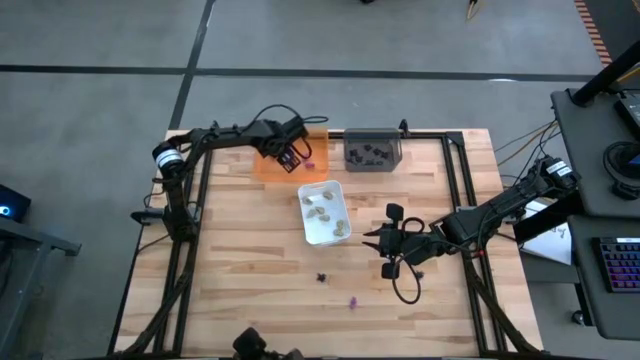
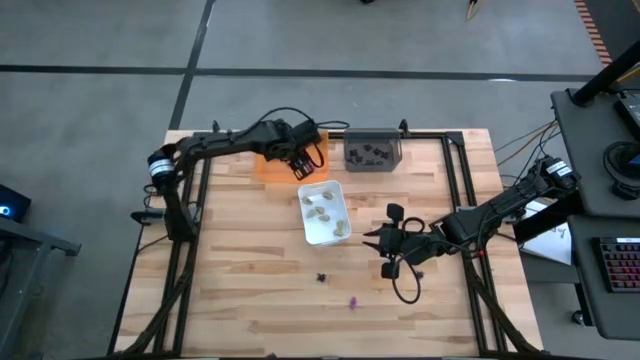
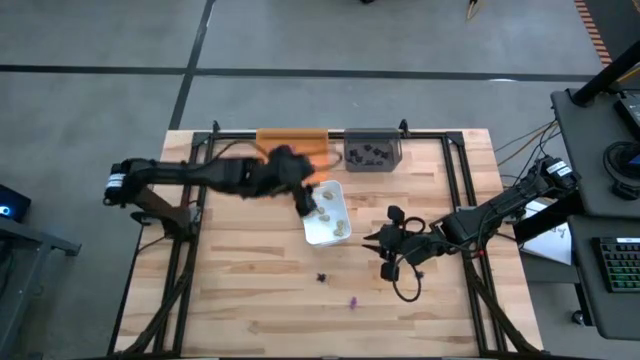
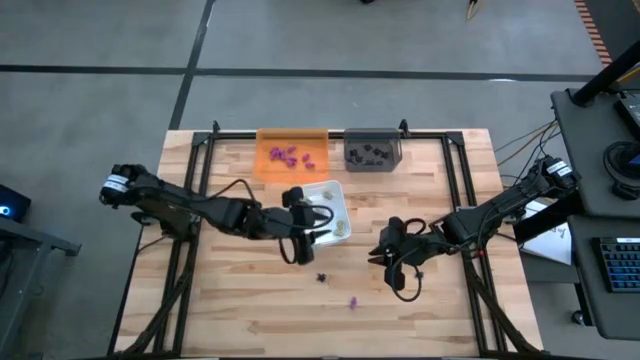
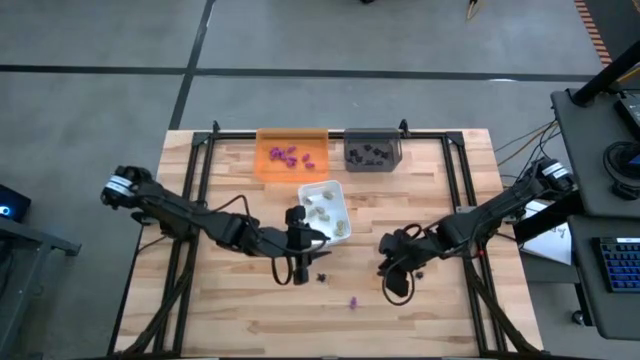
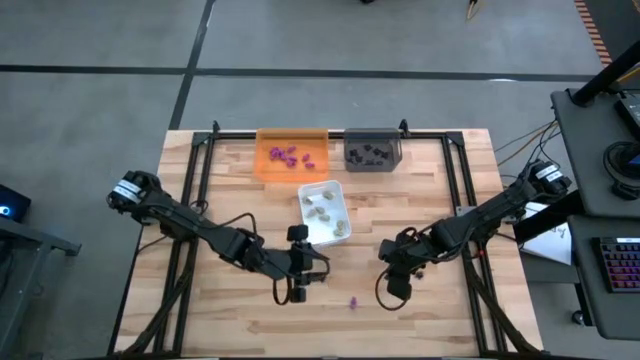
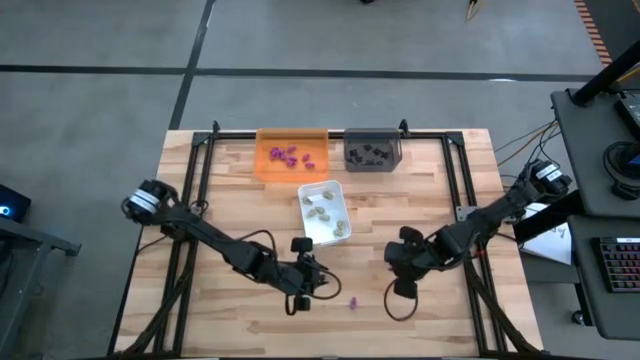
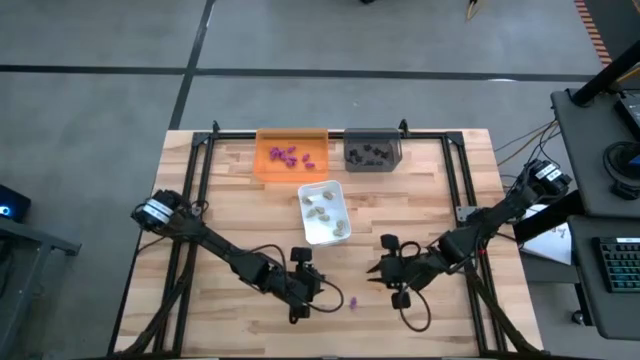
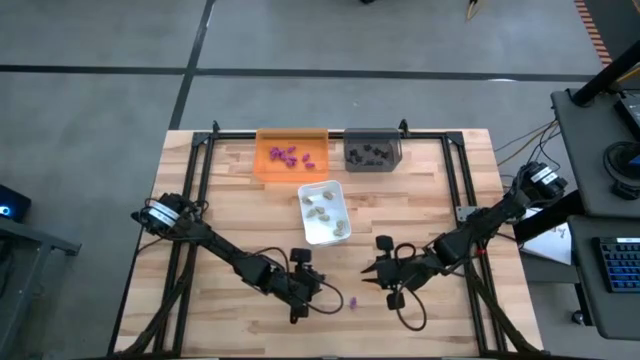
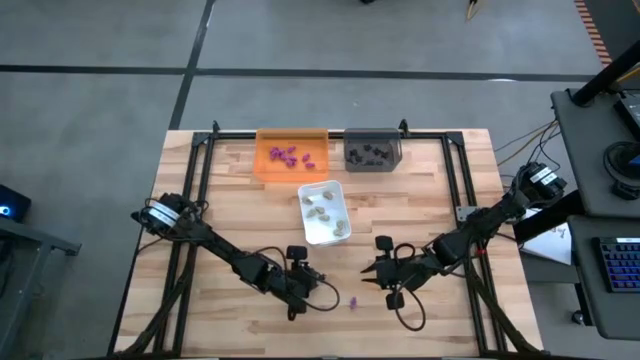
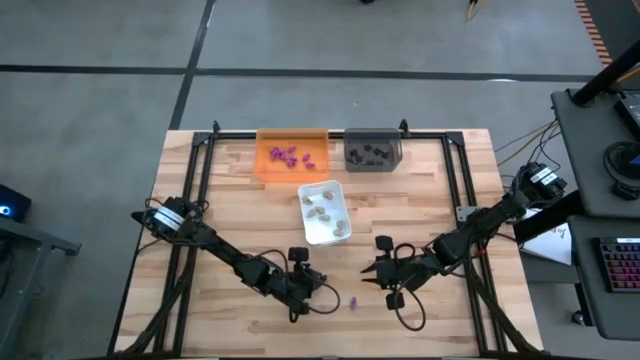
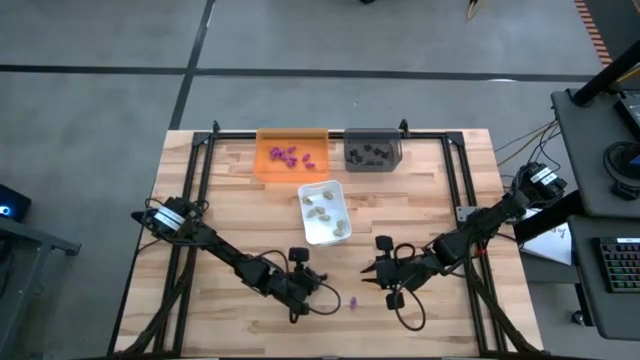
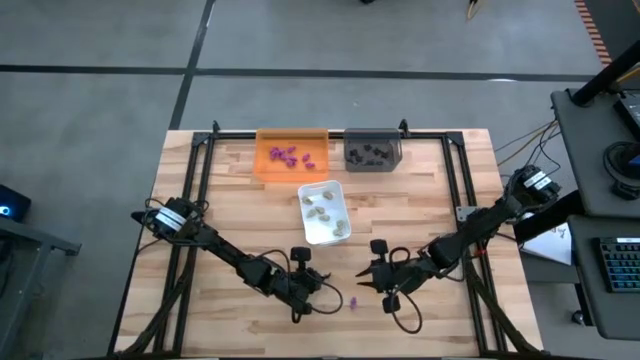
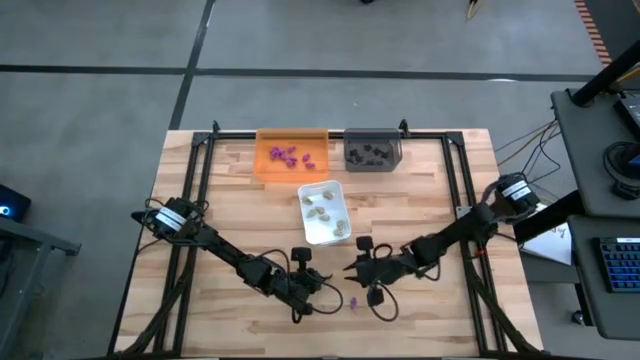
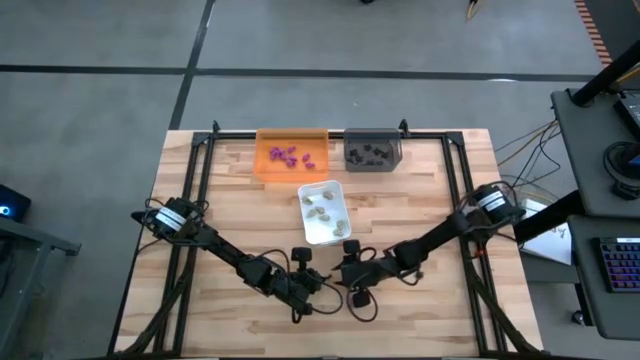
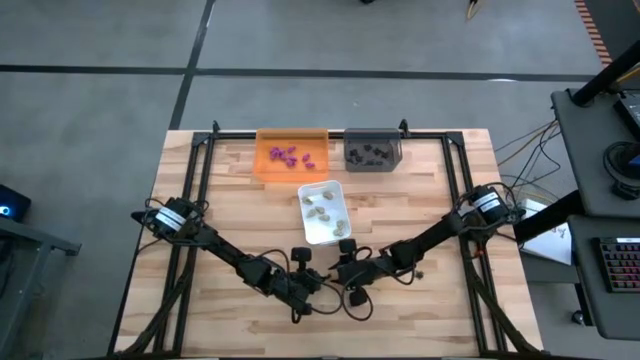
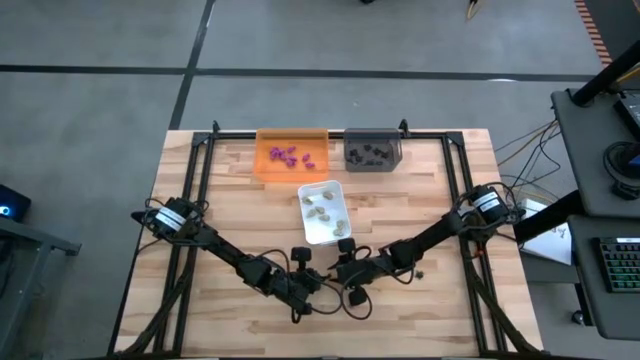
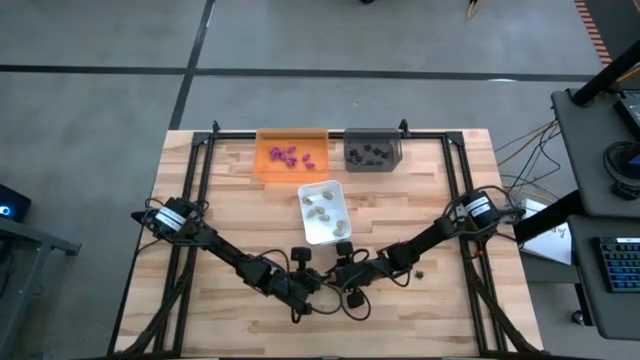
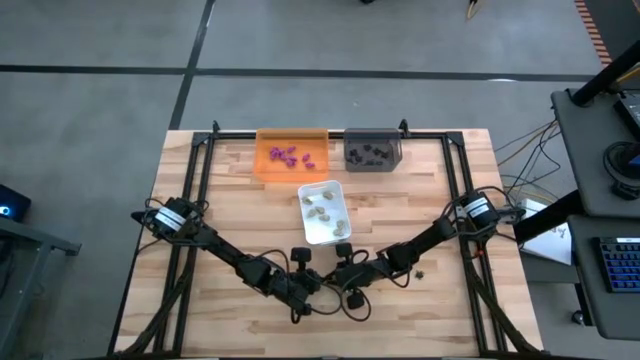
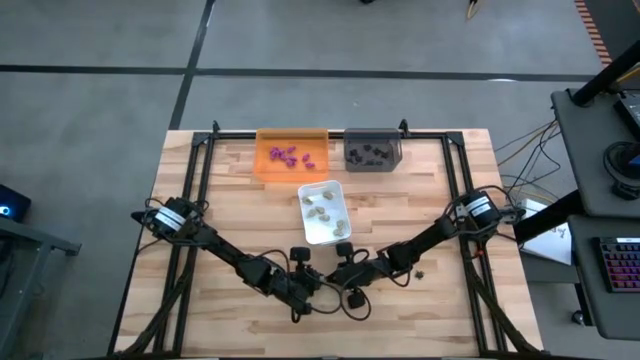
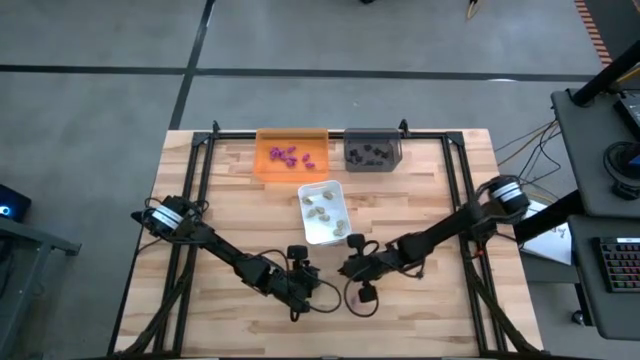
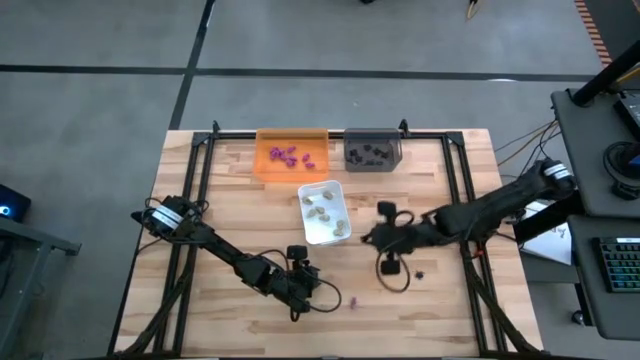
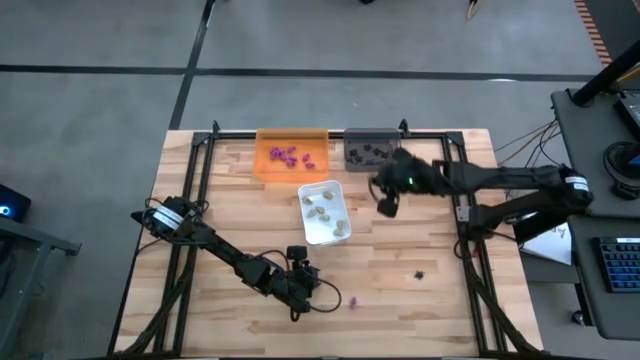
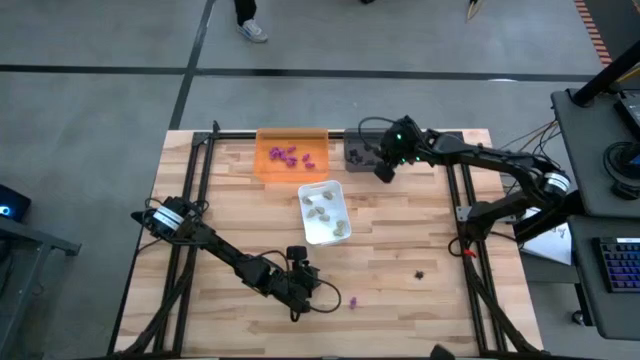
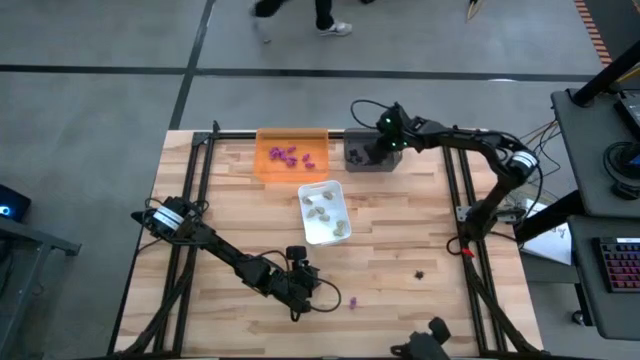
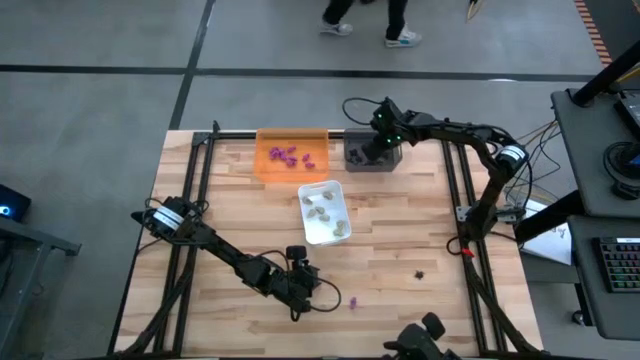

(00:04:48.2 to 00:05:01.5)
Task: Sort Halloween decoration
Put the black spider toy into the black bin

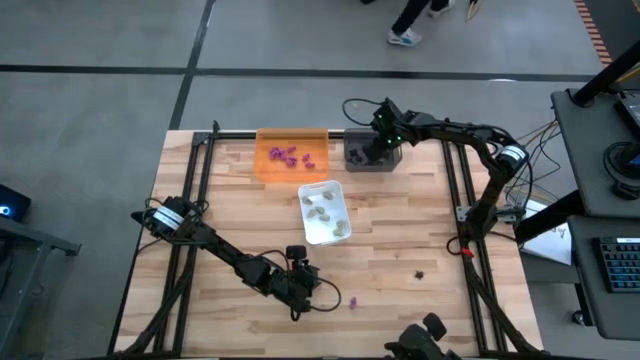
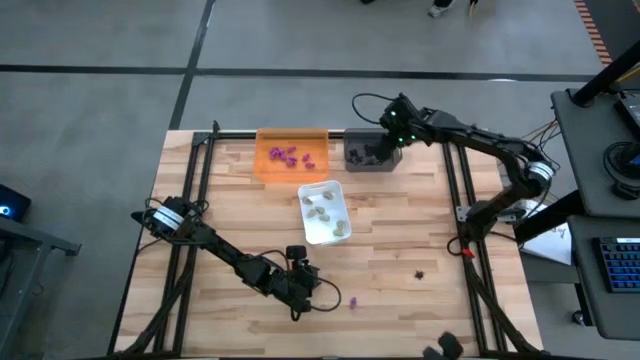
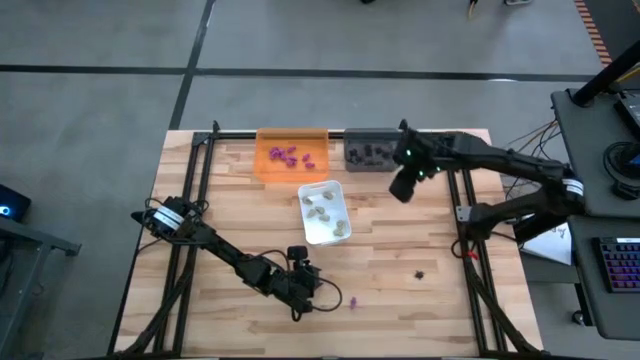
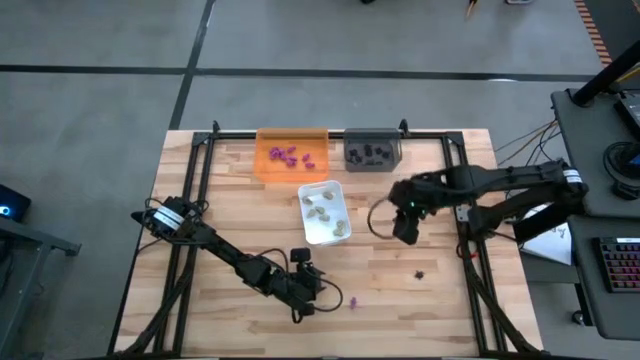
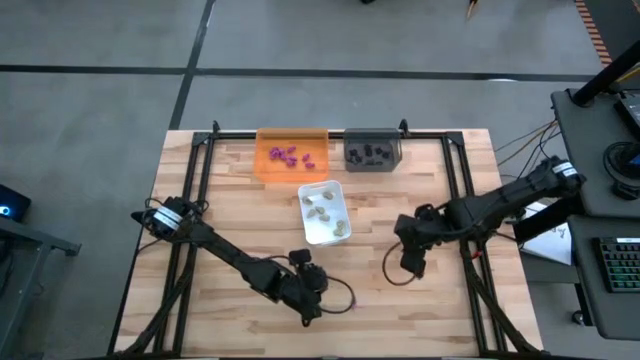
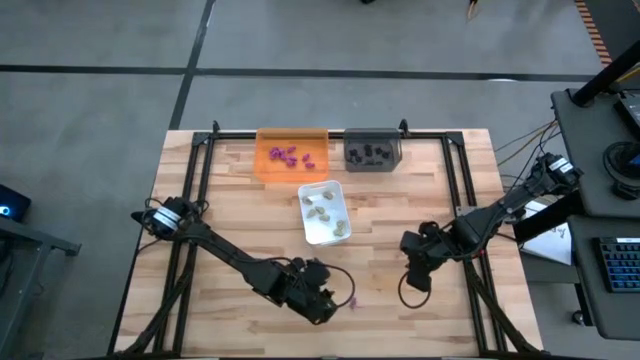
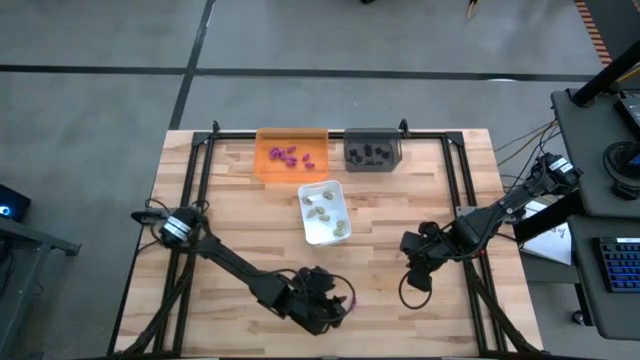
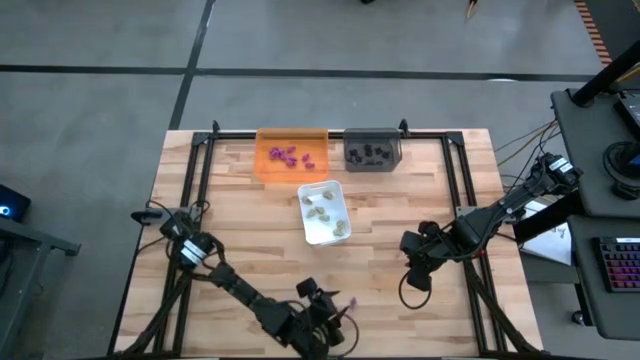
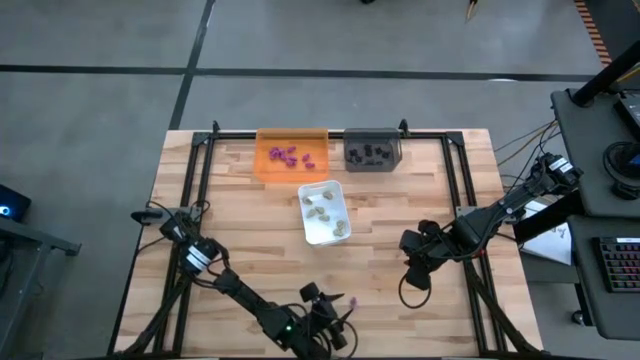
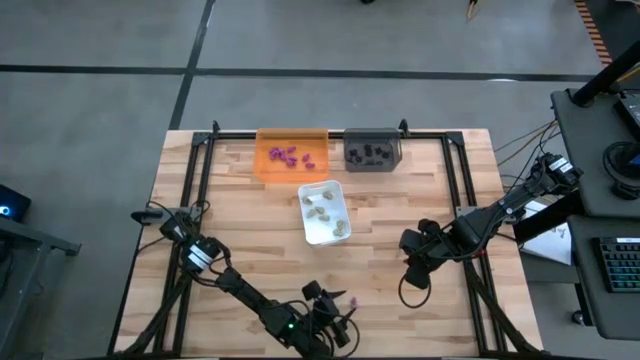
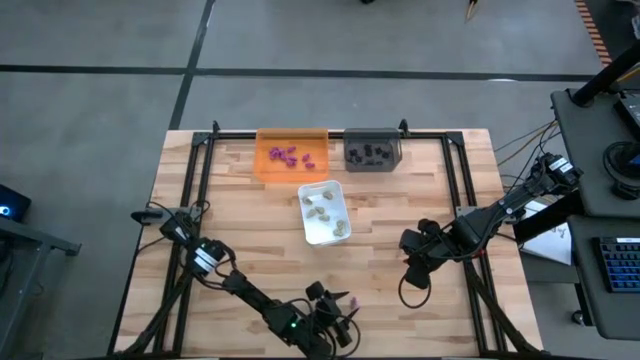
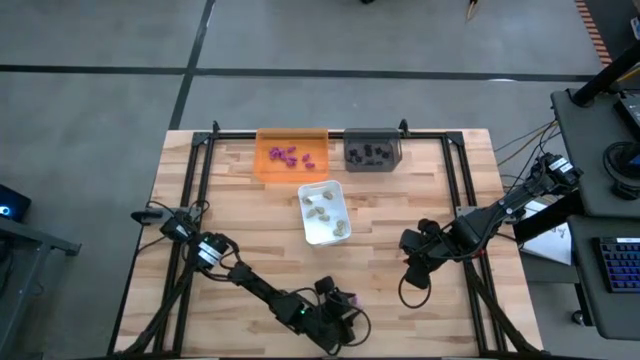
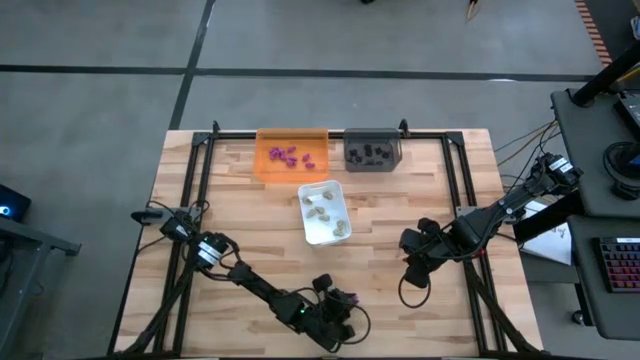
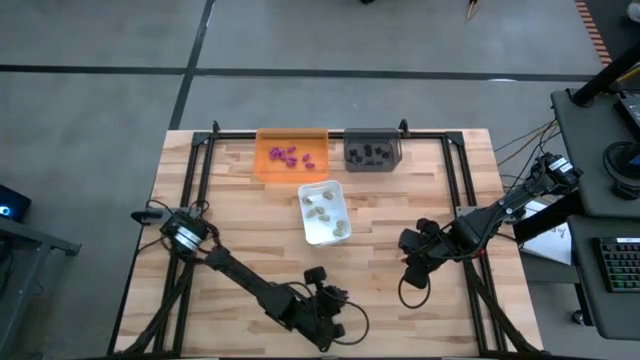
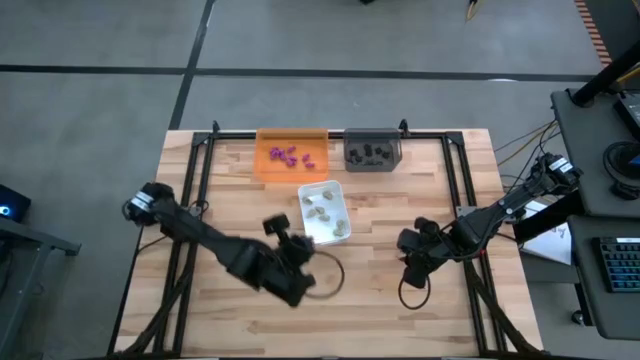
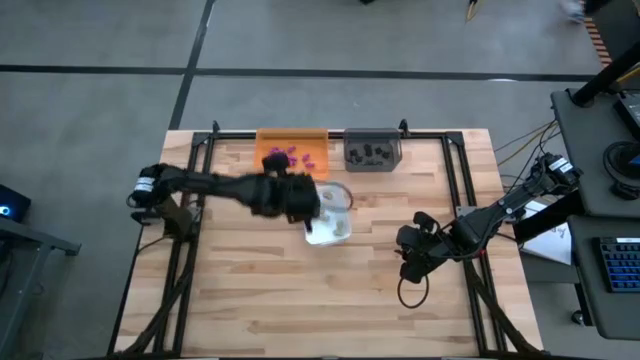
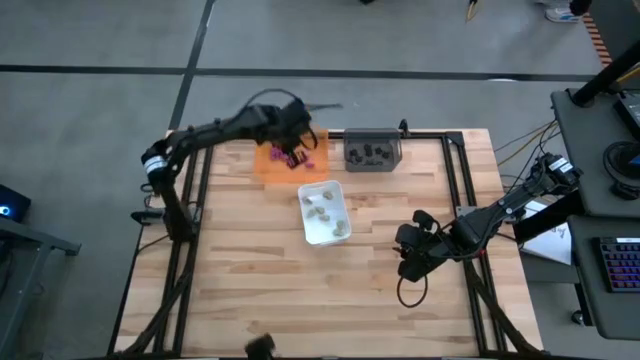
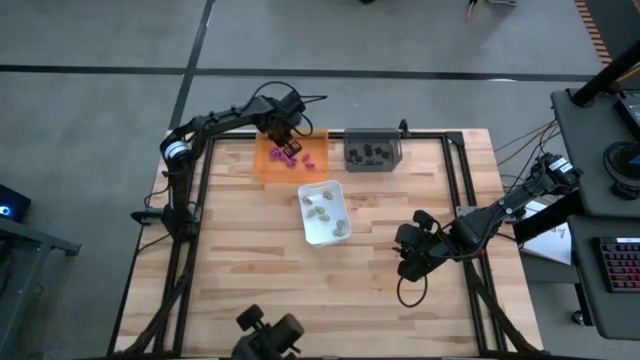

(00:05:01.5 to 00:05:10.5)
Put the purple skeleton toy into the orange bin
